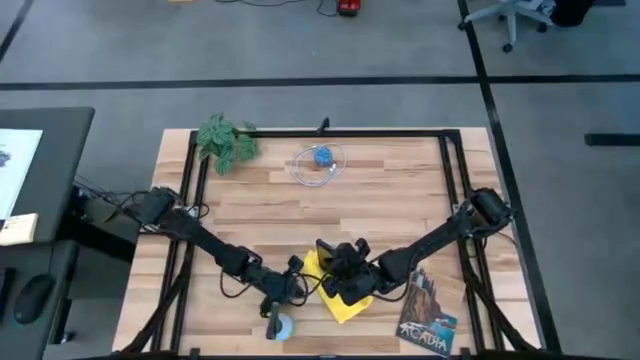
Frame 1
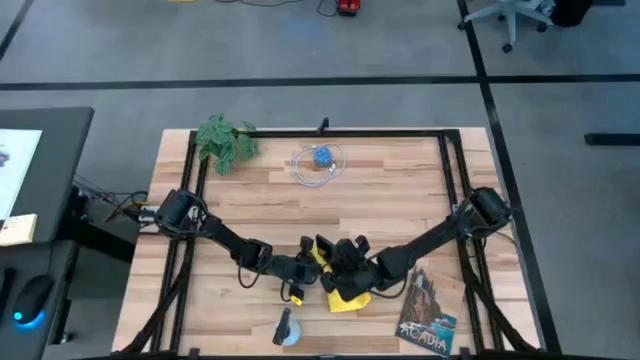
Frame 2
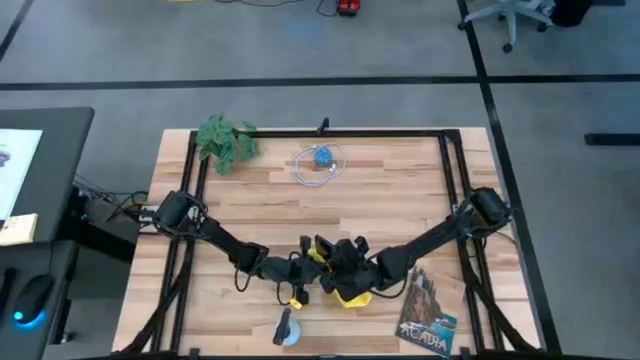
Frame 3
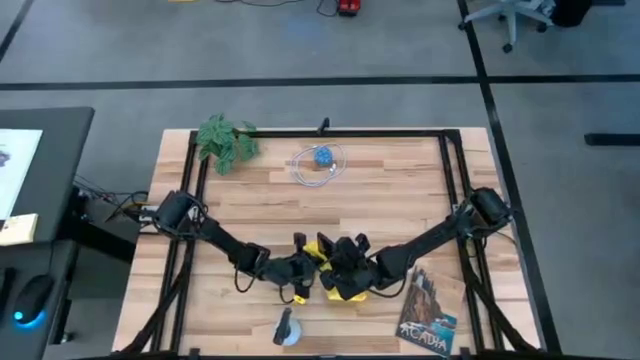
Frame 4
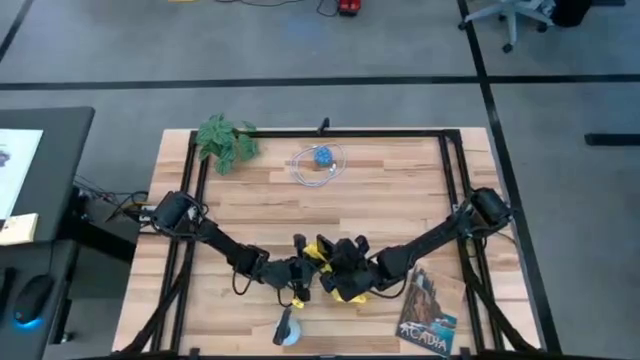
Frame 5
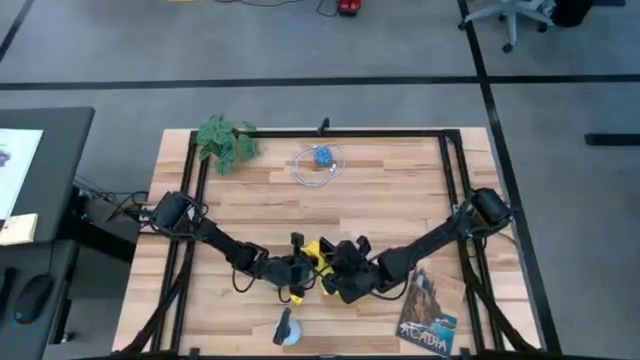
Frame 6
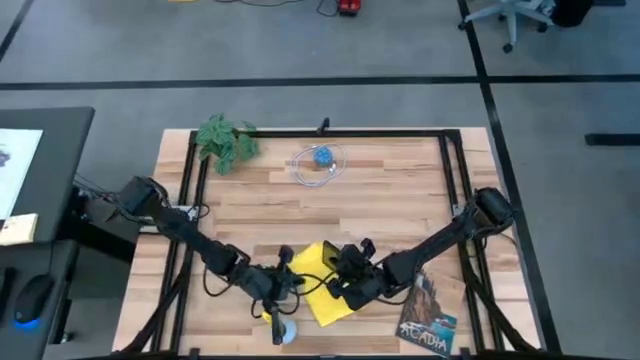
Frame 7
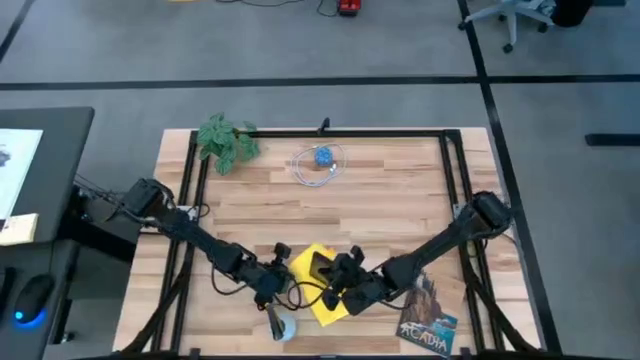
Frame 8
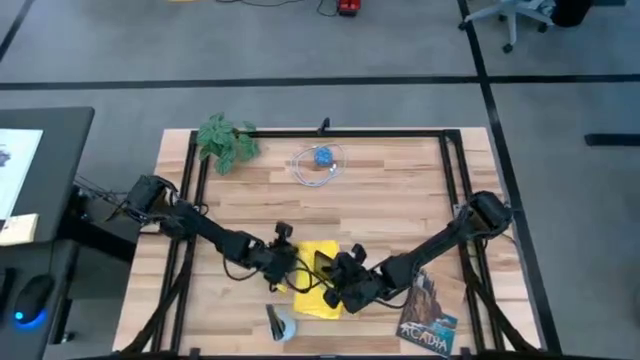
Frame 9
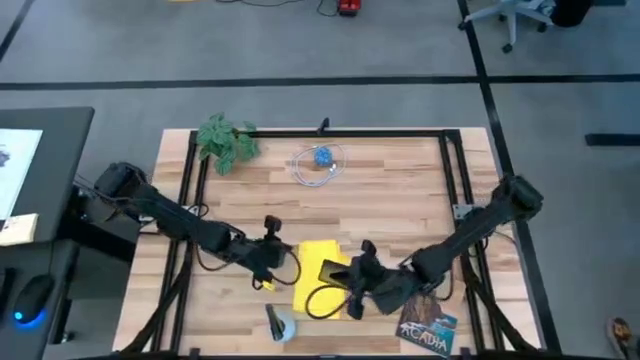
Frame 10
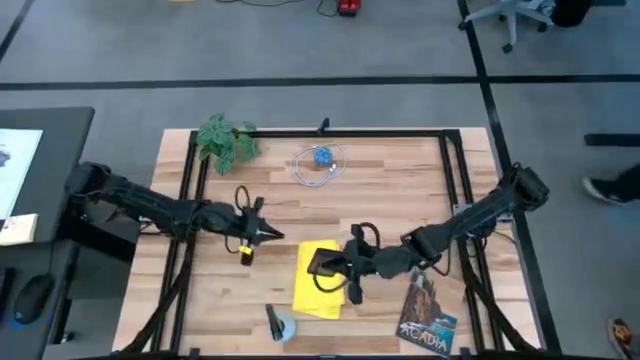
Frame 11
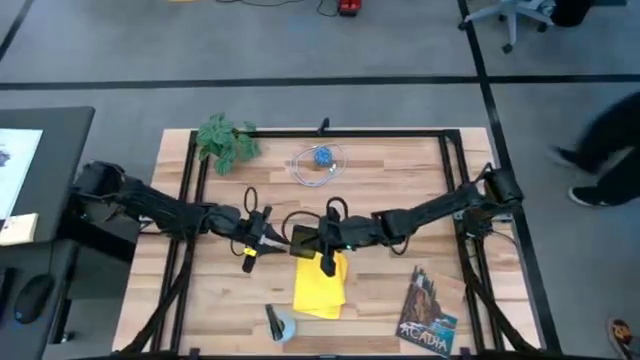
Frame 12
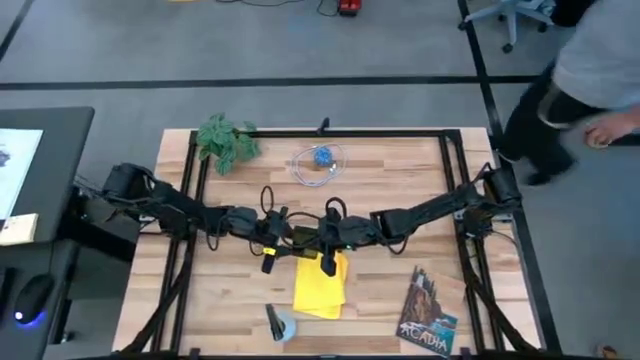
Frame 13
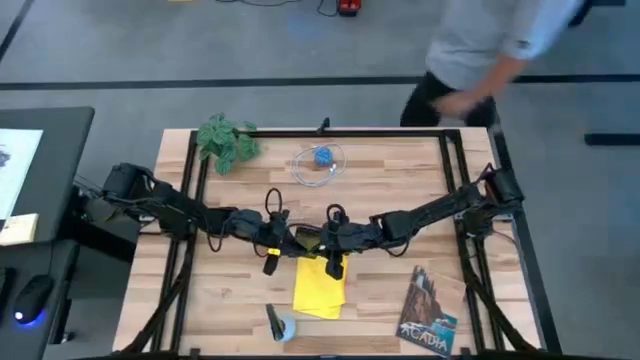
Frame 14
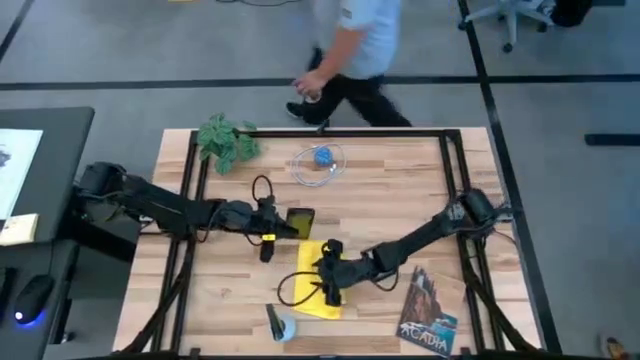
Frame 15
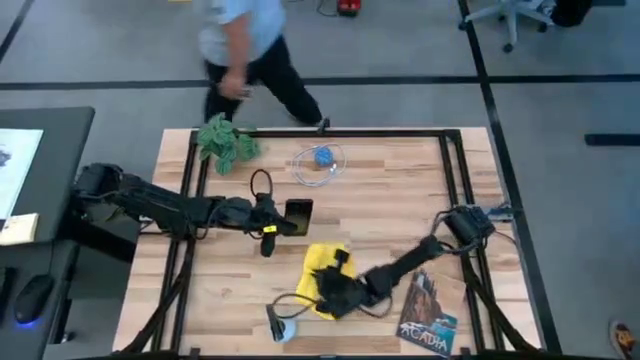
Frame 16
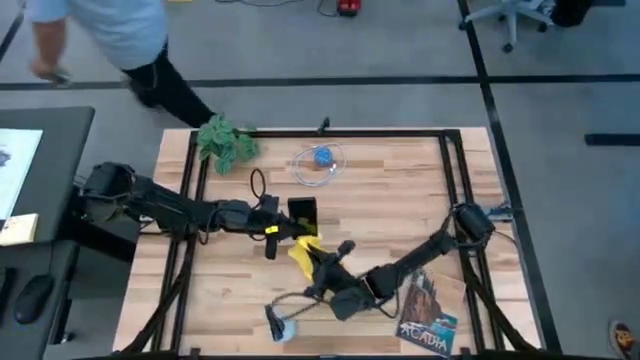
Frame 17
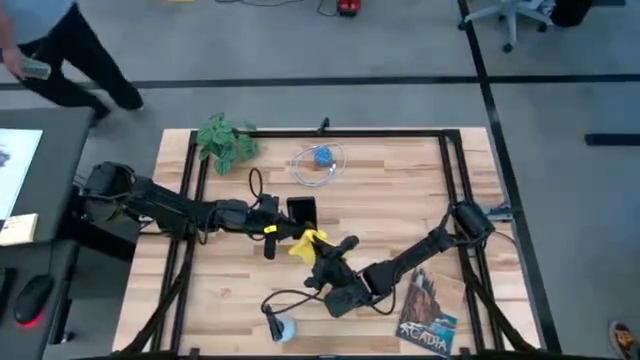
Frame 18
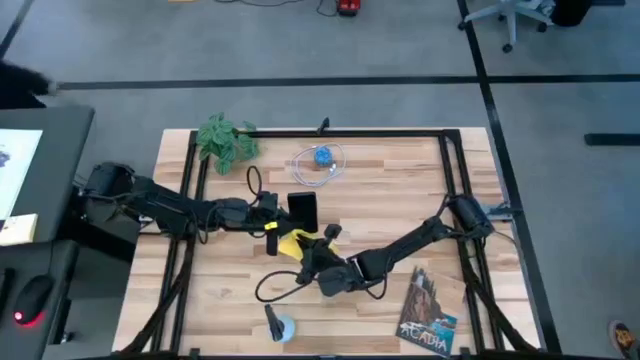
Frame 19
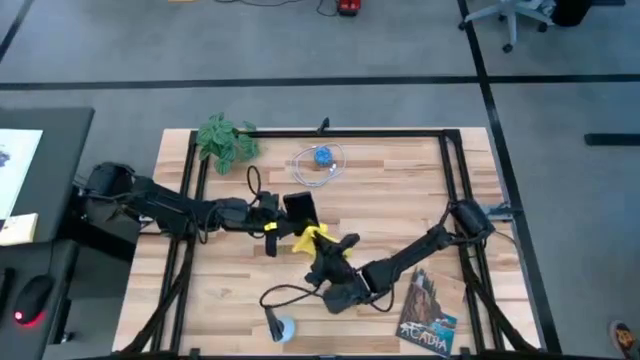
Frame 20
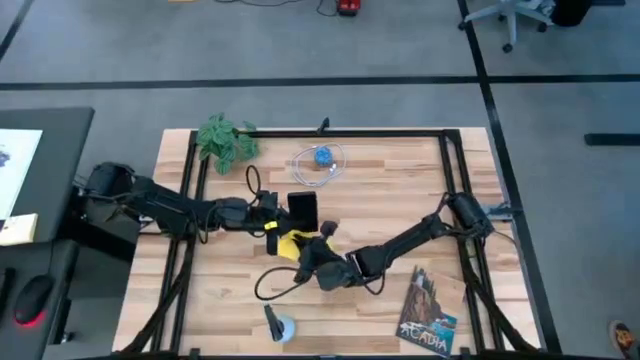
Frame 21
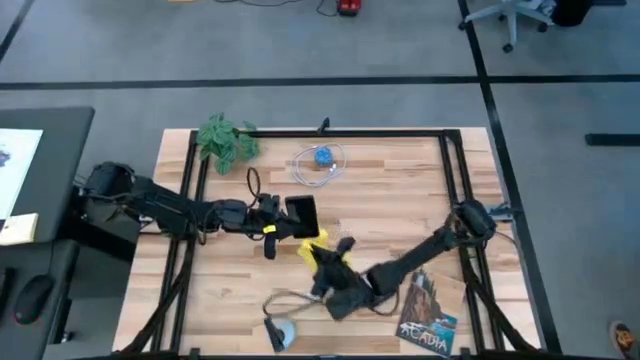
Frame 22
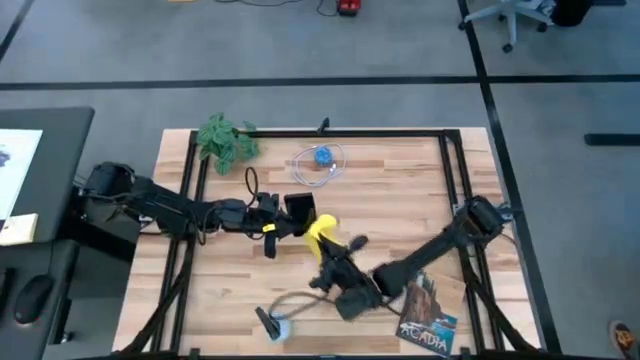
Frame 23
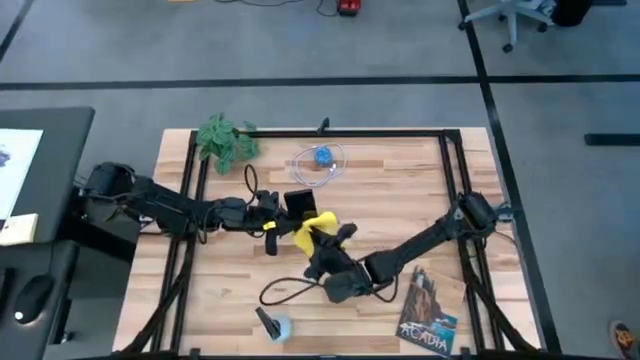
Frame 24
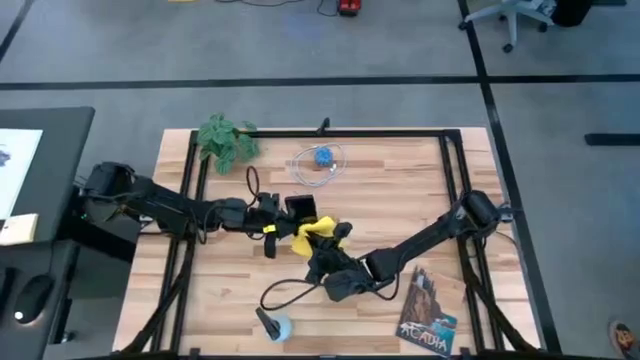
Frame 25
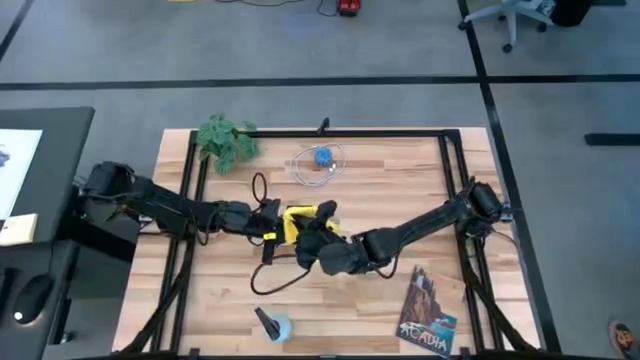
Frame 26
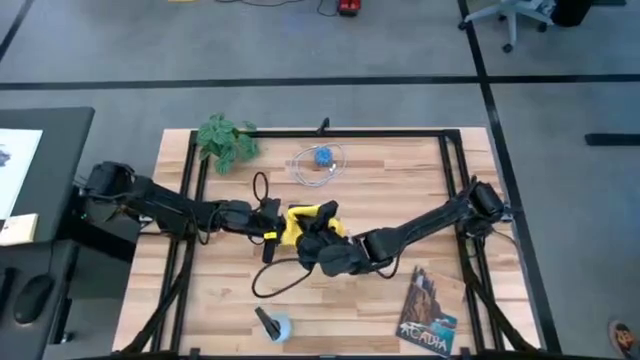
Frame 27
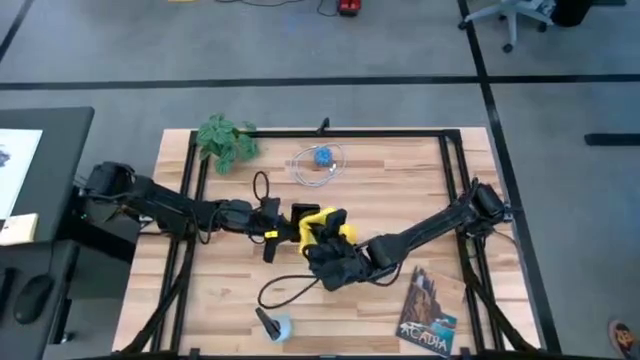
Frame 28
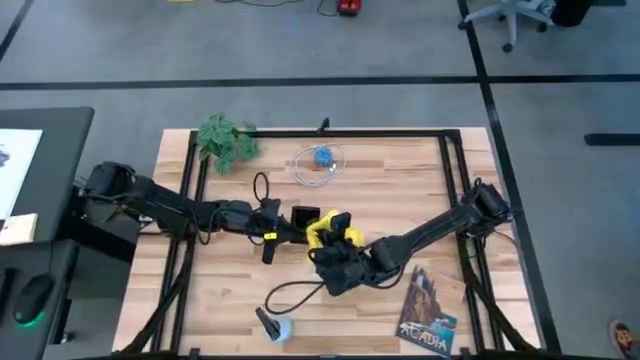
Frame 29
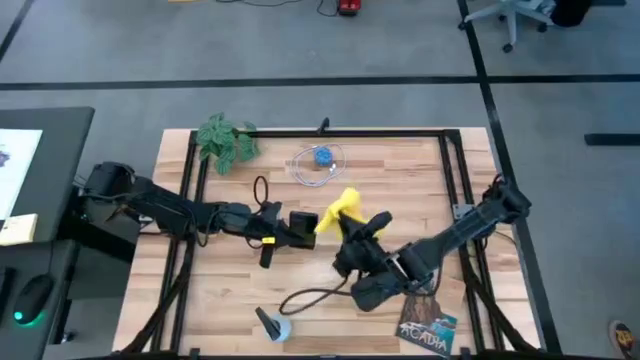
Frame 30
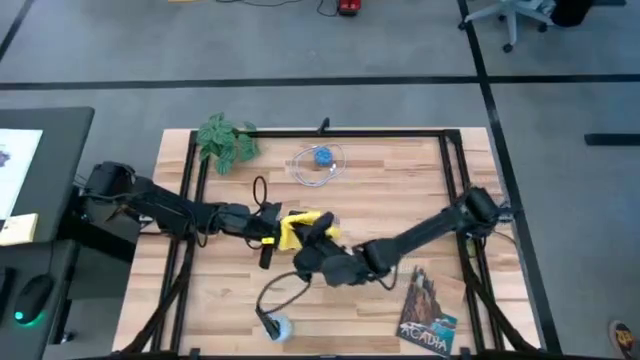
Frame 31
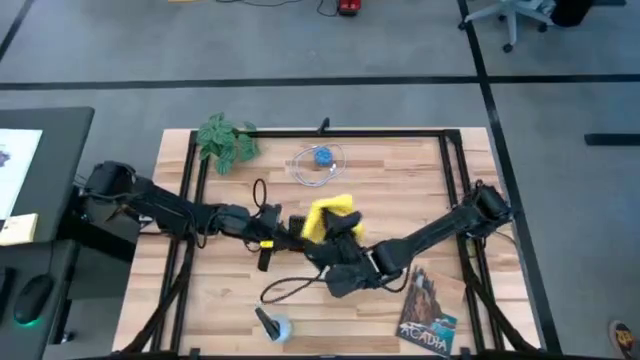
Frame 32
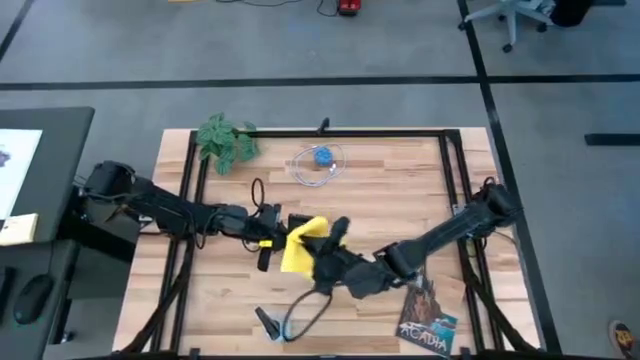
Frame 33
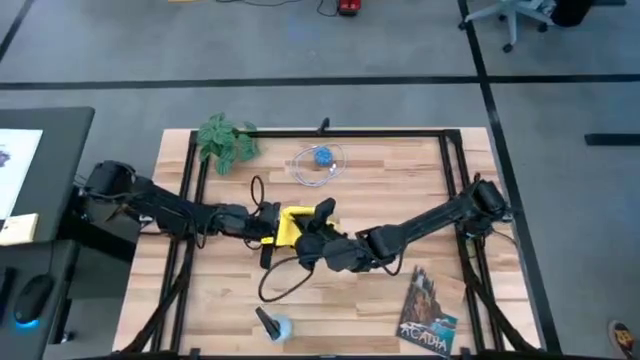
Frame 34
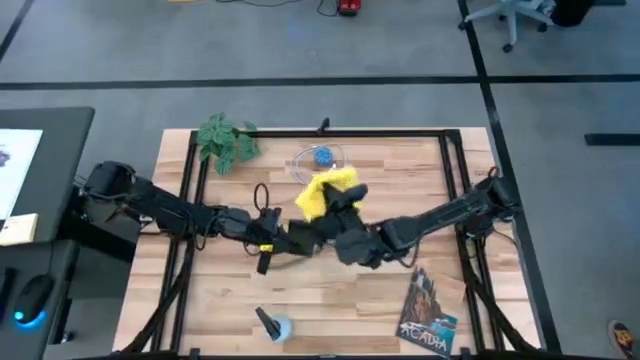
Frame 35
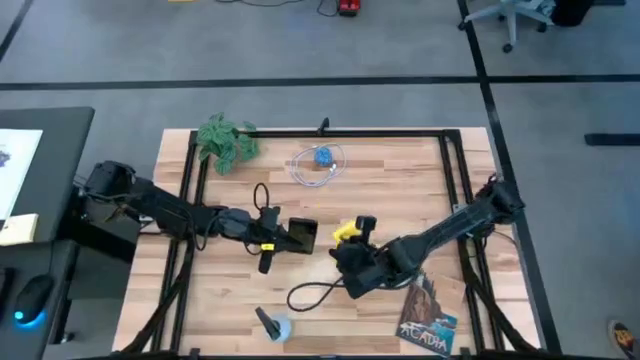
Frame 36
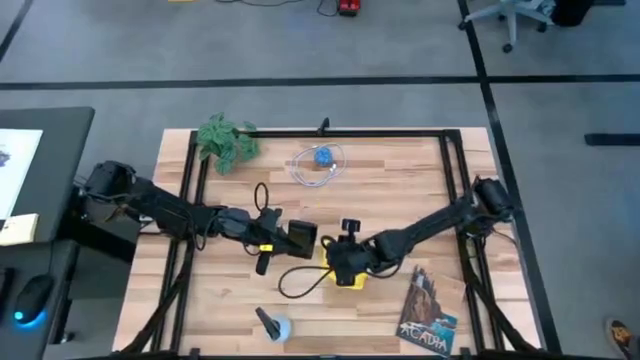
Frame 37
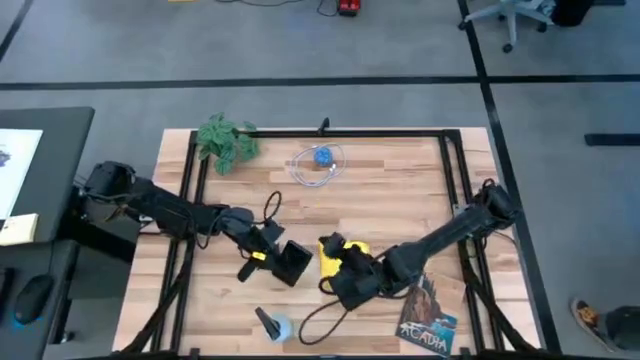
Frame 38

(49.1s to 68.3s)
Task: Apply microfiber cloth
Wipe the cellphone using a microfiber cloth

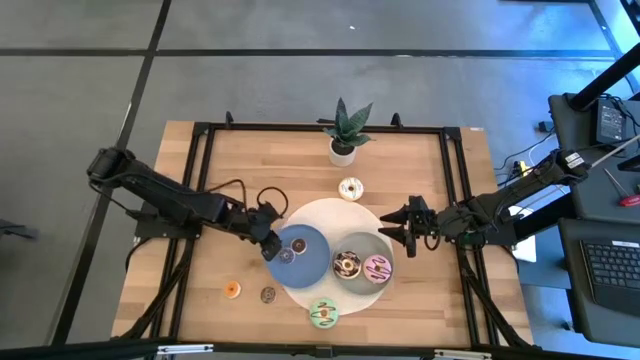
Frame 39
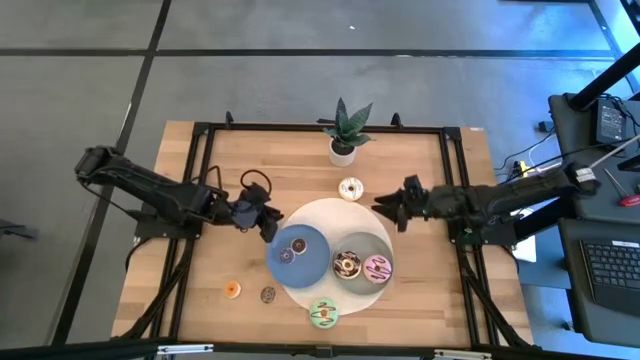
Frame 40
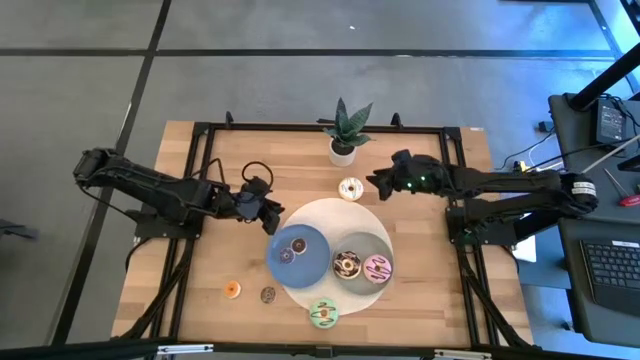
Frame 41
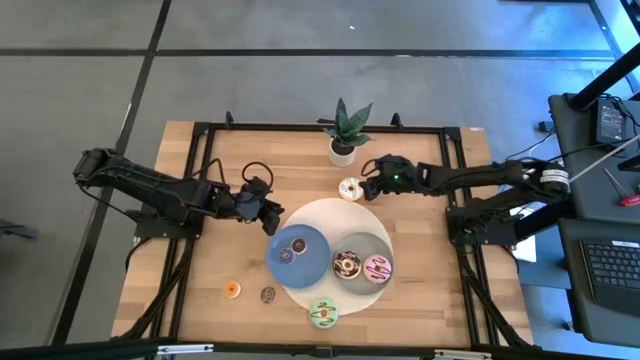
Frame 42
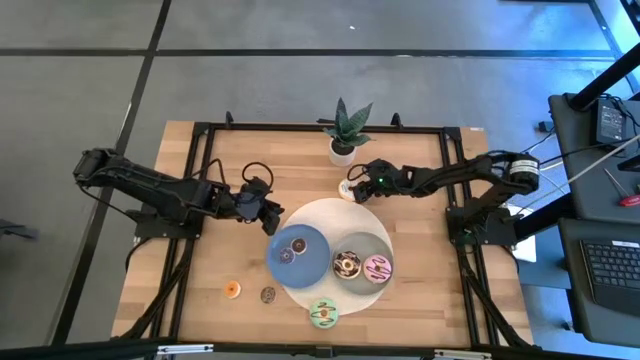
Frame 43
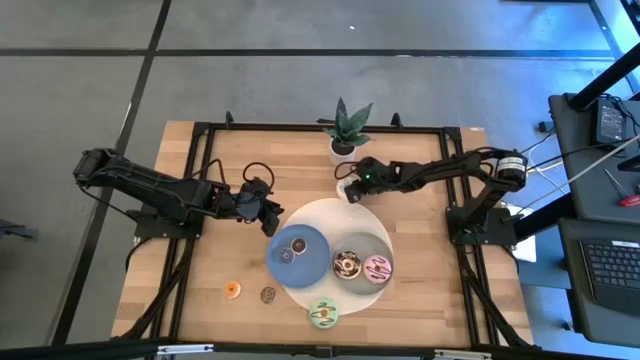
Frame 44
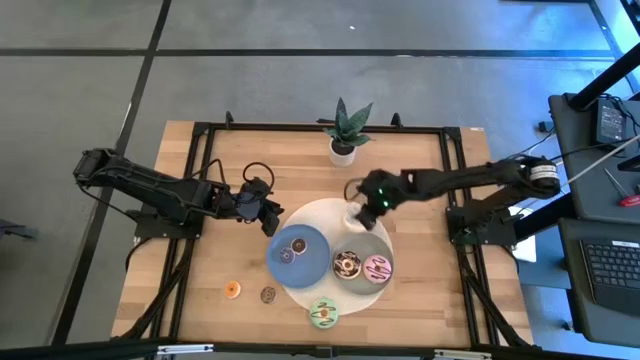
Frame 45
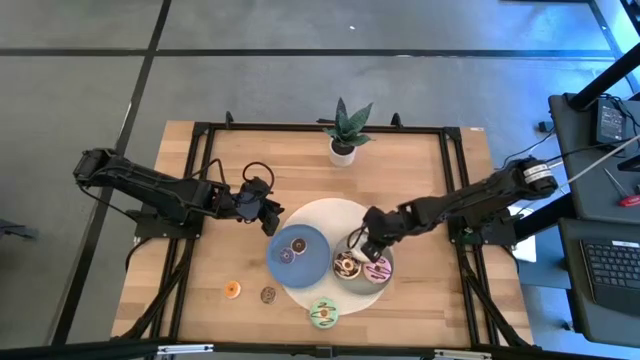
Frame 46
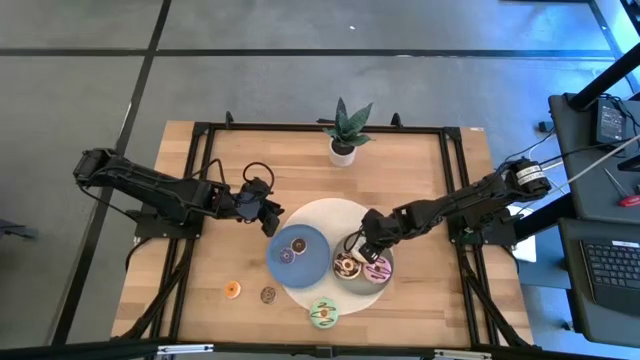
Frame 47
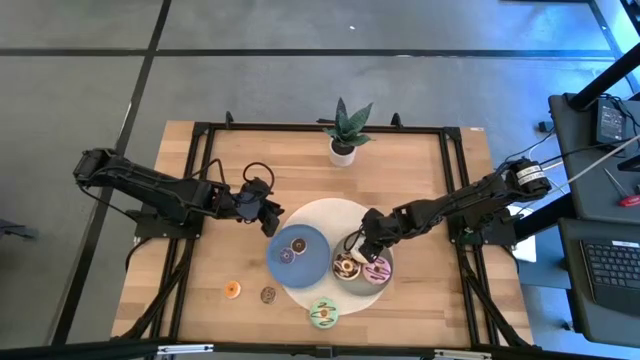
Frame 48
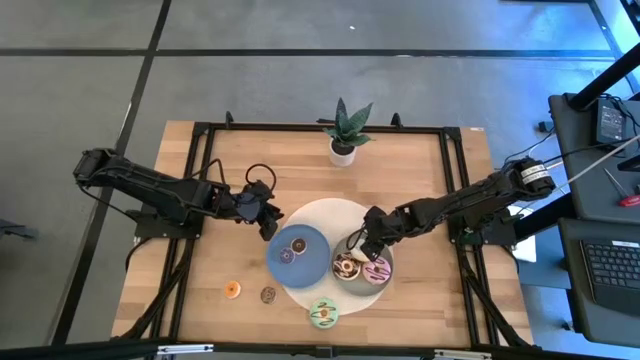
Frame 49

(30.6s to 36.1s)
Task: Pick & Place donuts
Put the large white donut on the gray plate
